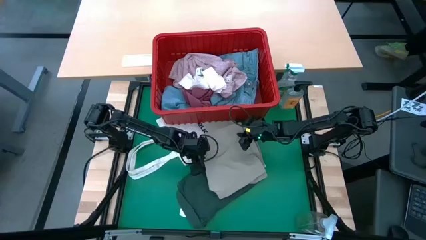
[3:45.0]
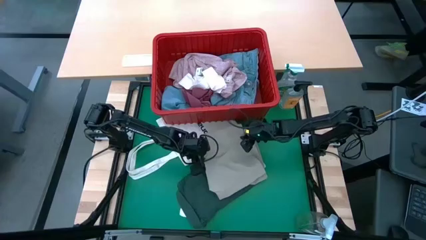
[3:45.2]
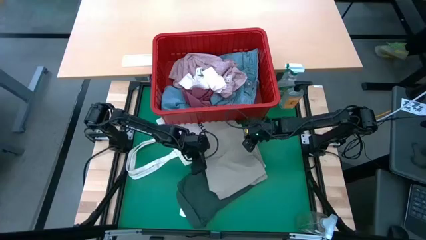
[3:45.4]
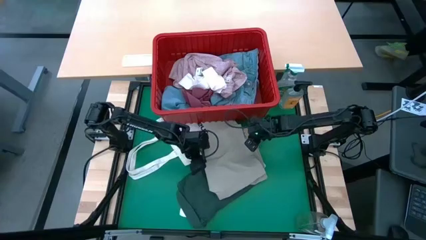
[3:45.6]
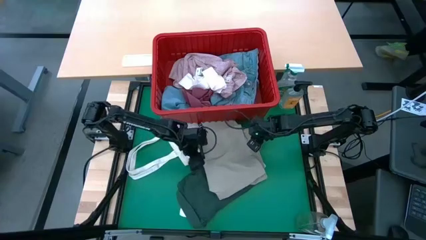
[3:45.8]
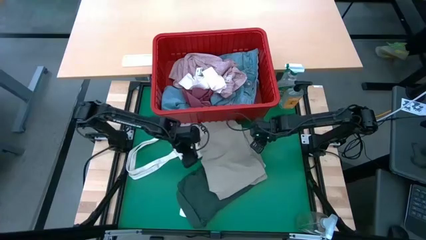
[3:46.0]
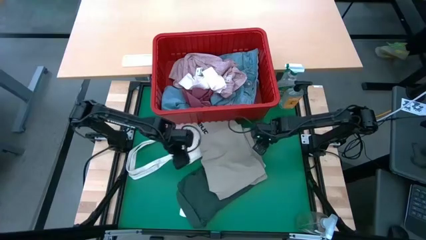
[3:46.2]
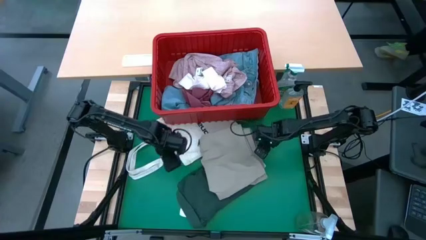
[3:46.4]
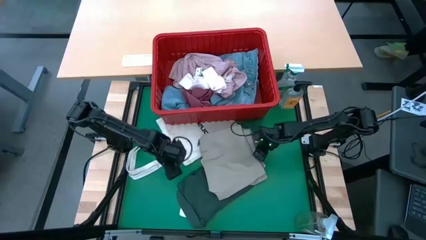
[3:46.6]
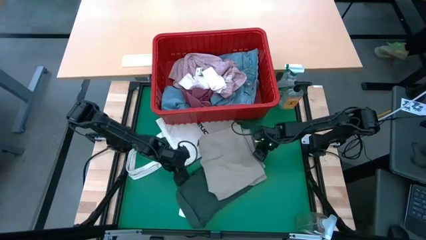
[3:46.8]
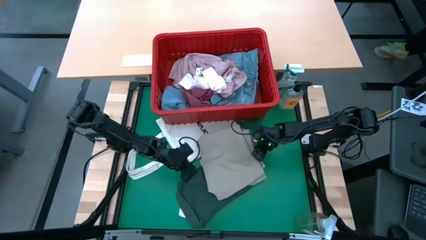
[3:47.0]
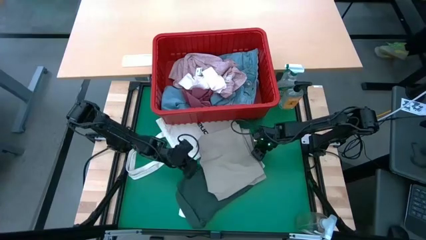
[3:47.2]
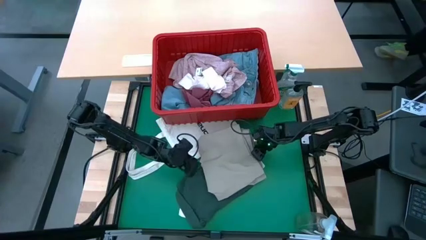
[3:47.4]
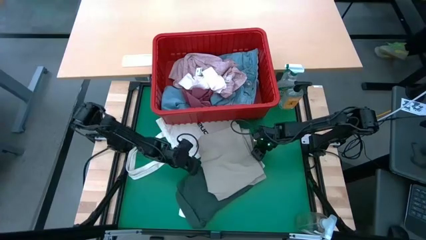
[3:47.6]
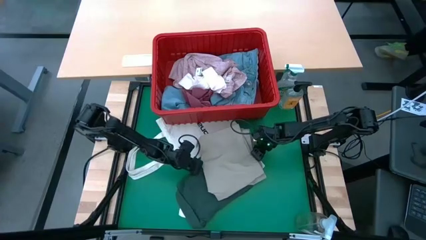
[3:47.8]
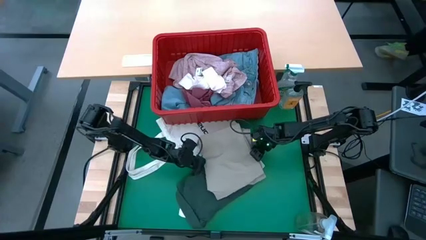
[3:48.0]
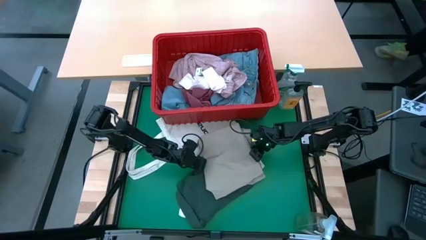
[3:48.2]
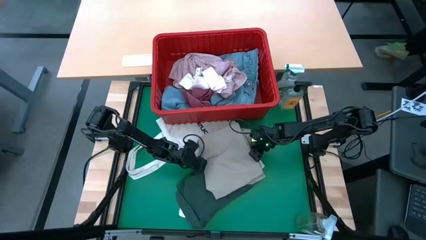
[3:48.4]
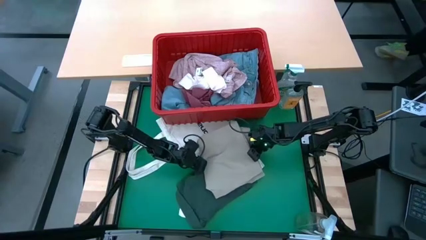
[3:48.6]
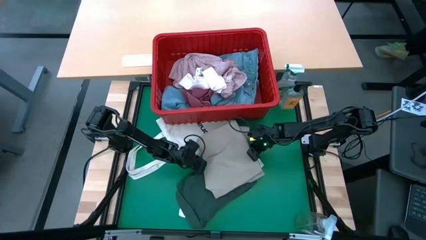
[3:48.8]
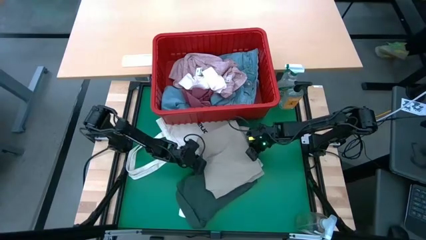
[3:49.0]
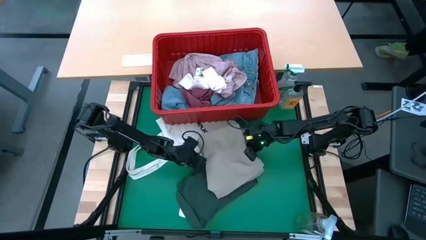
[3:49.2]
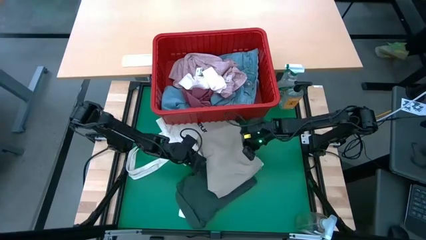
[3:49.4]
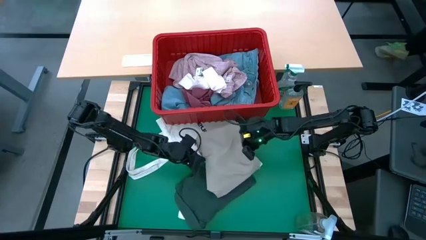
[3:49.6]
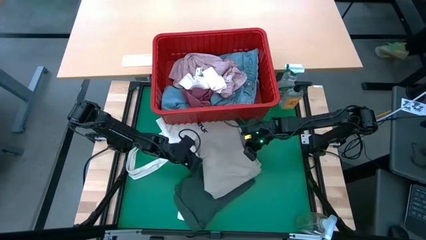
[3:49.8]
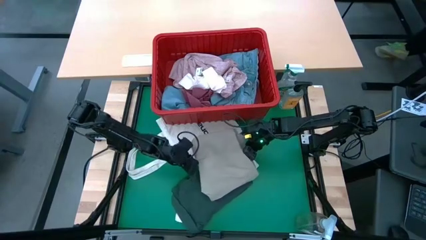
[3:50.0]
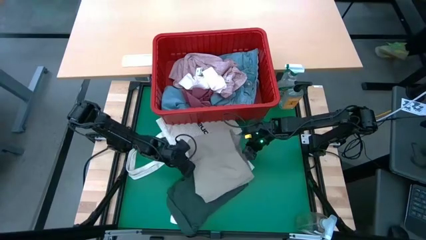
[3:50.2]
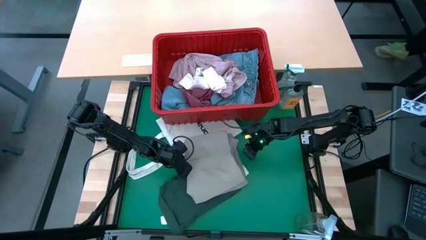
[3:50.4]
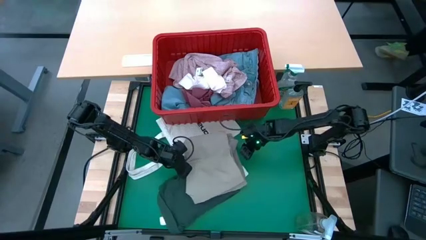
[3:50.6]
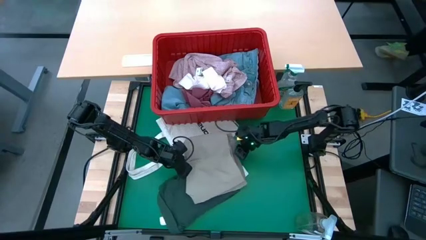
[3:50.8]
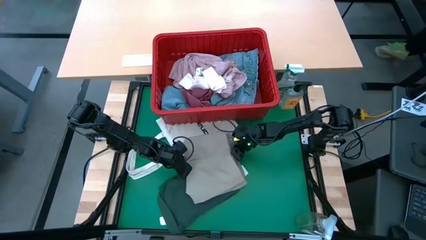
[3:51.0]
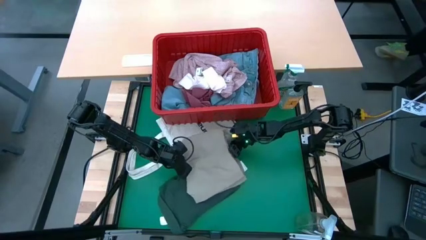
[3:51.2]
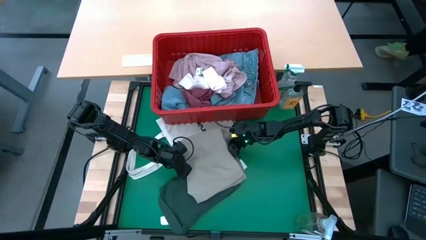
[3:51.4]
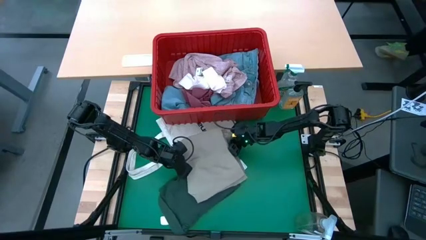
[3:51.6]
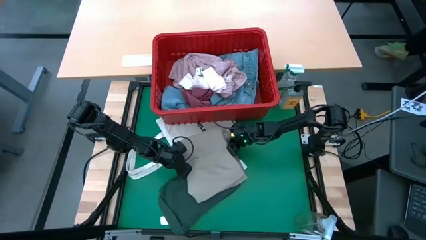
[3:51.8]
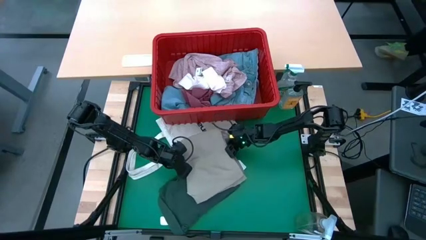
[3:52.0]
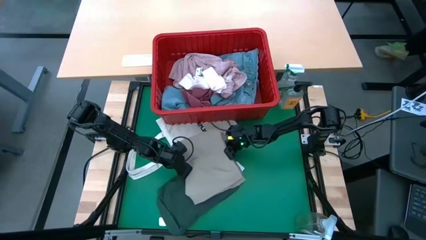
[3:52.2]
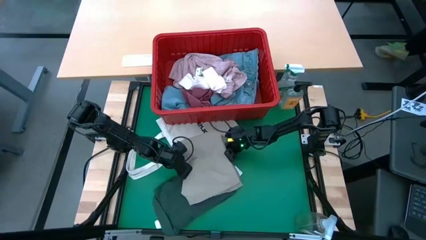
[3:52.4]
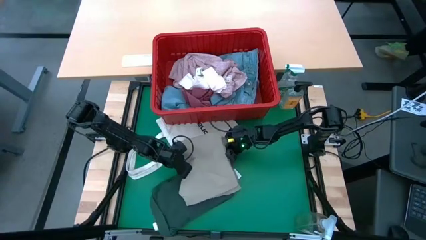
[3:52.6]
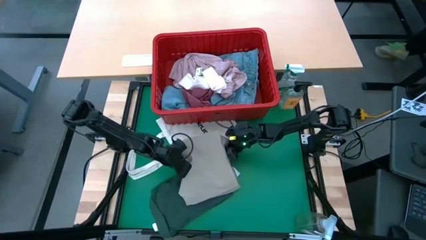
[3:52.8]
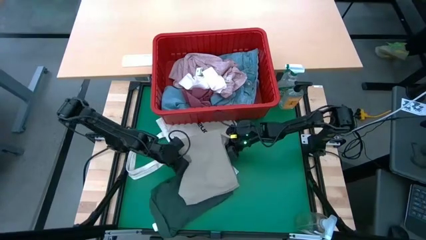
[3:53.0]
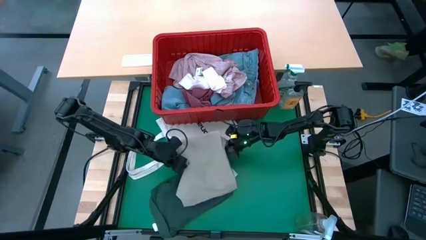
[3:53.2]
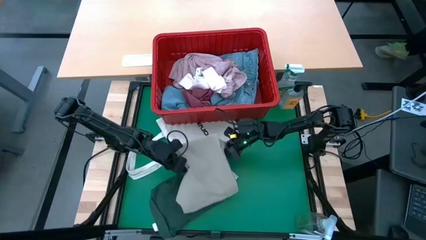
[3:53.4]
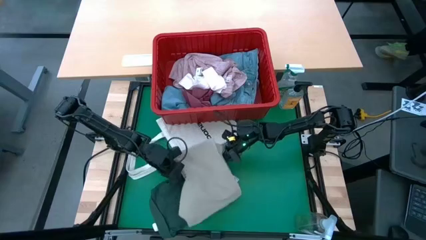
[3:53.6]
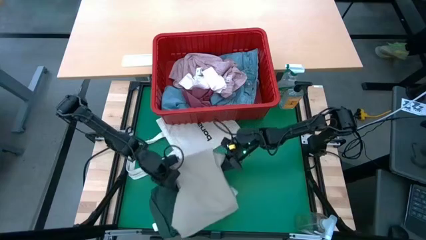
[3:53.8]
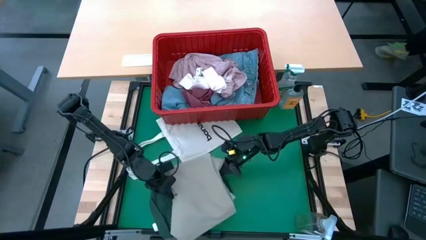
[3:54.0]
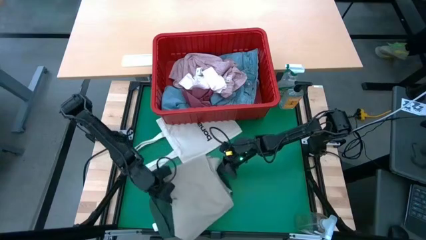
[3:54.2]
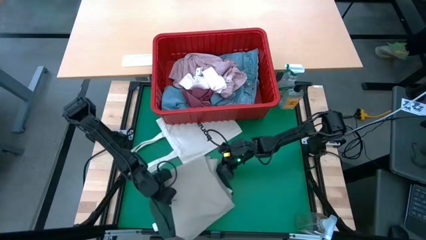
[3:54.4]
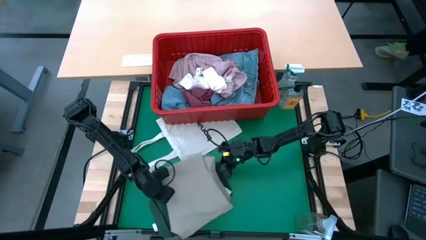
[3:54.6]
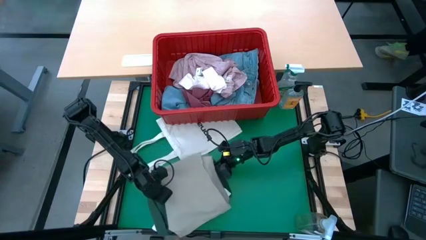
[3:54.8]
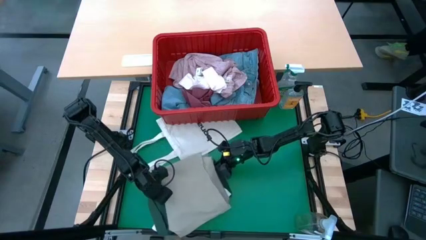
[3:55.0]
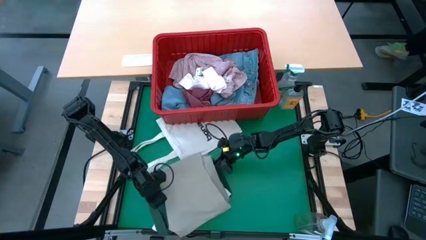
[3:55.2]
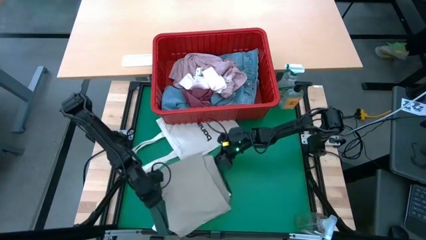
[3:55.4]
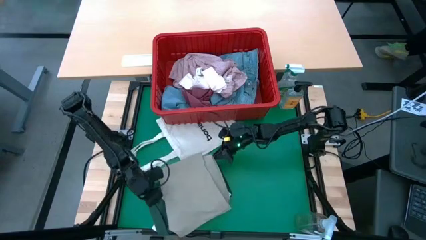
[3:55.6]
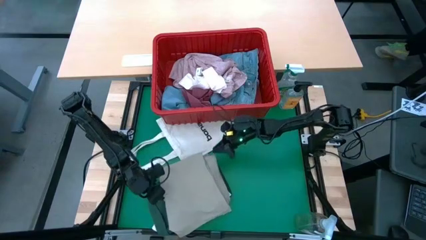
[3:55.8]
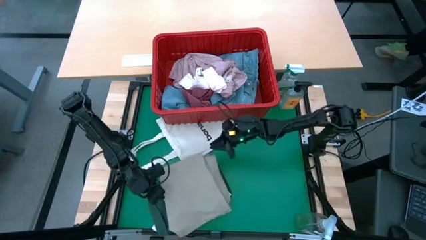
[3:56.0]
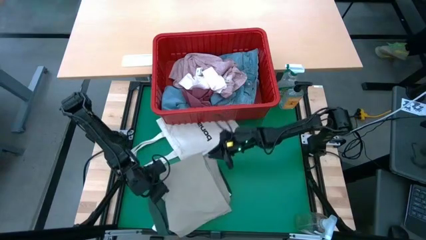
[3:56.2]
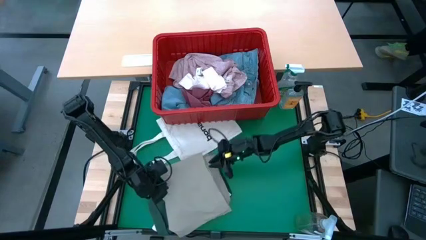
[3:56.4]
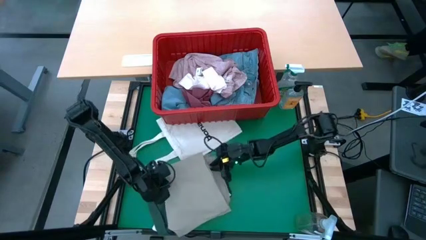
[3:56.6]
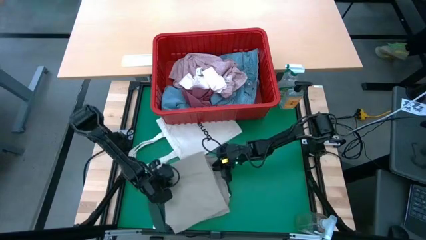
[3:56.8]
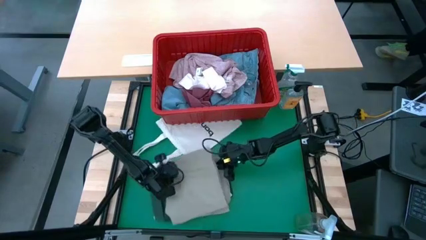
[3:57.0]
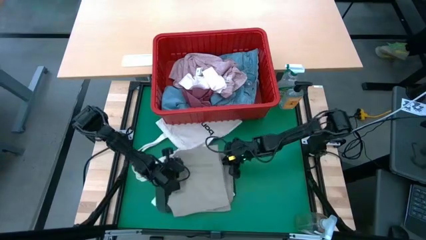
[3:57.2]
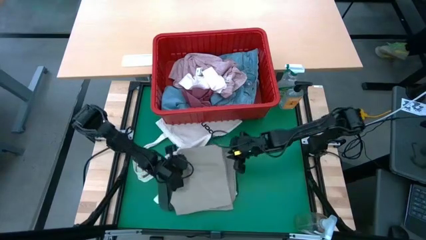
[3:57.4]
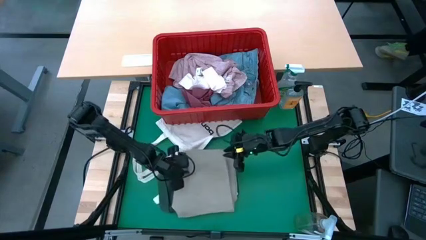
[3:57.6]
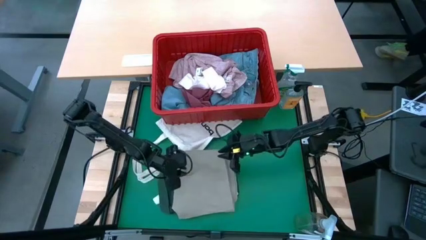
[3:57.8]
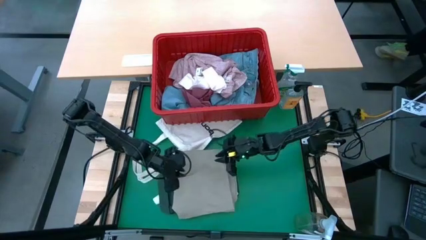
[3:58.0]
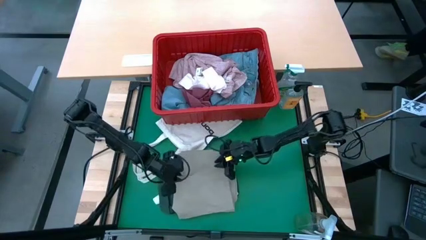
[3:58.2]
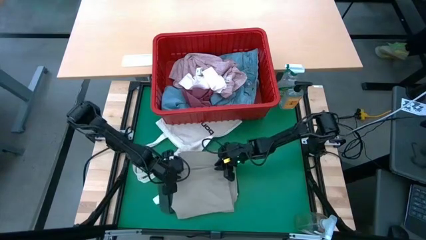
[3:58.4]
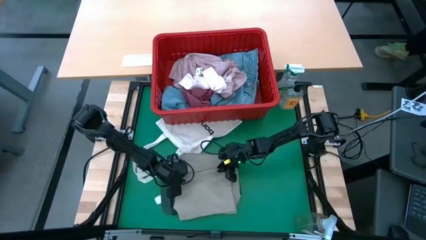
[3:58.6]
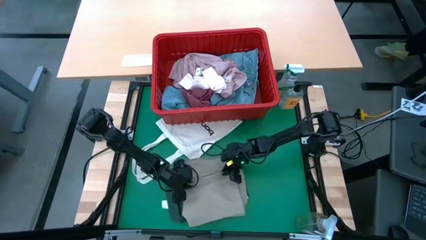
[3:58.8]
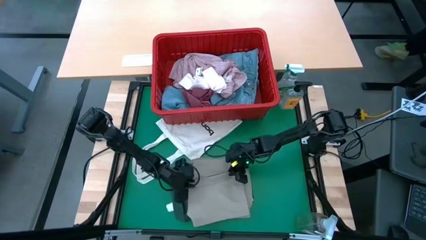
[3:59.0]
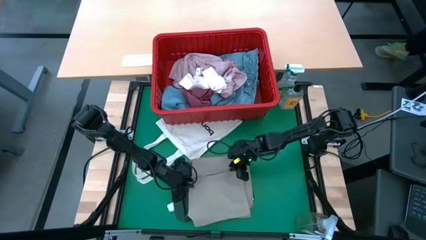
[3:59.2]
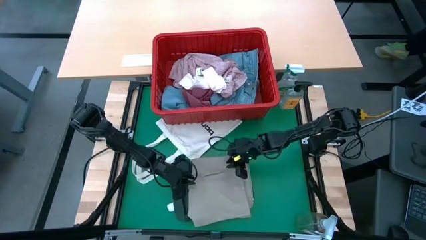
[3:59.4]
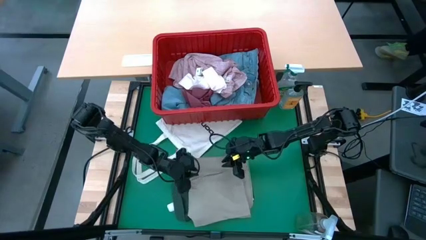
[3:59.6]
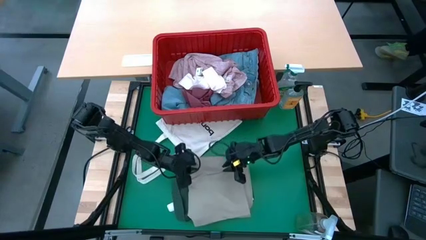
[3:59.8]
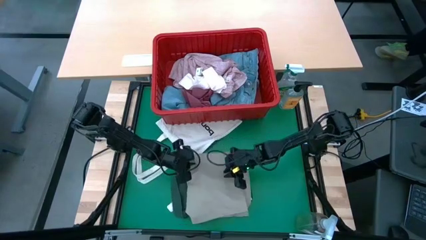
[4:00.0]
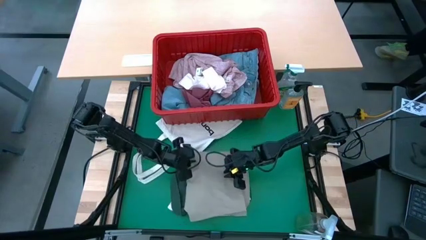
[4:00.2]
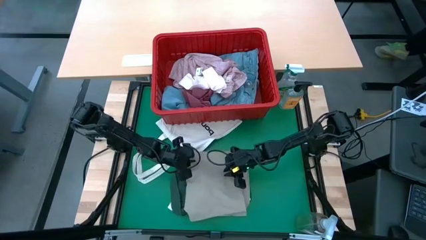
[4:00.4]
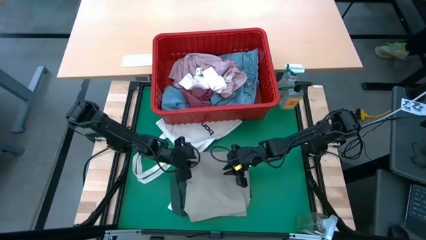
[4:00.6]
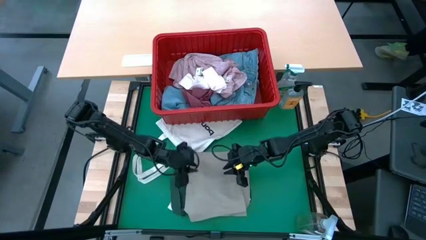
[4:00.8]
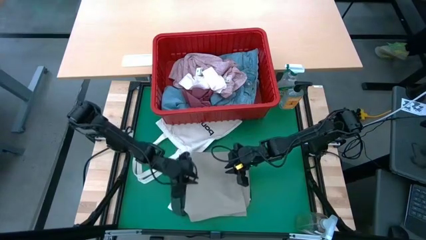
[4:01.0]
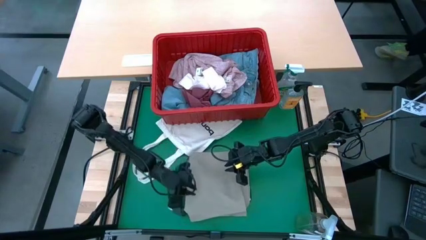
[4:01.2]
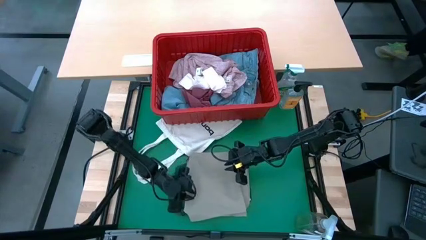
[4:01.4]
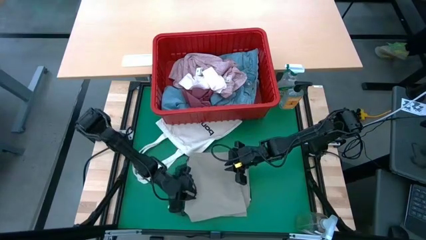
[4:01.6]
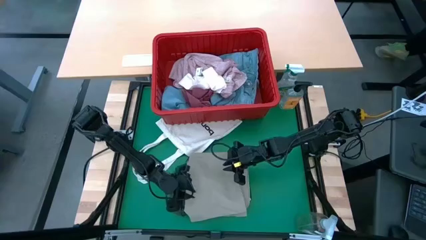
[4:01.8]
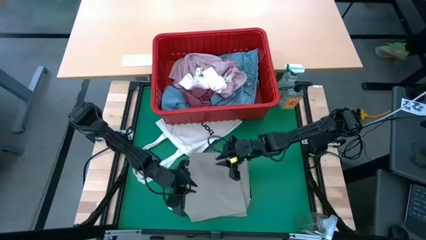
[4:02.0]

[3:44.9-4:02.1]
Task: Fold laundry
Fold the grey shorts
